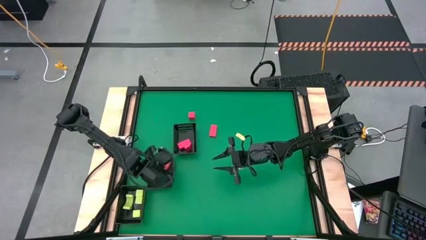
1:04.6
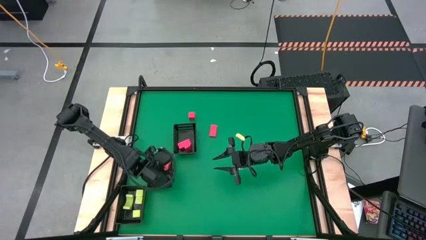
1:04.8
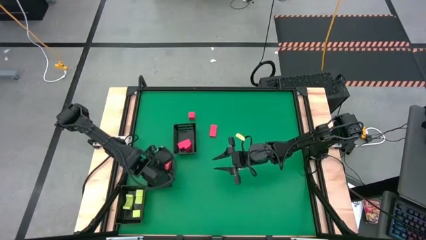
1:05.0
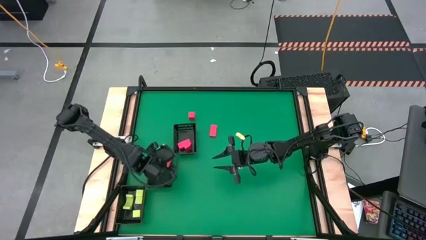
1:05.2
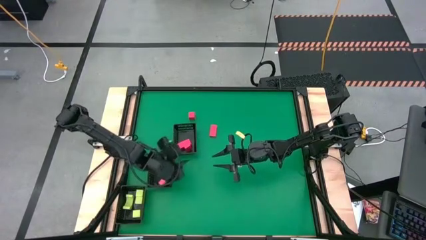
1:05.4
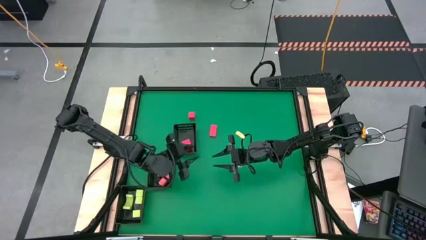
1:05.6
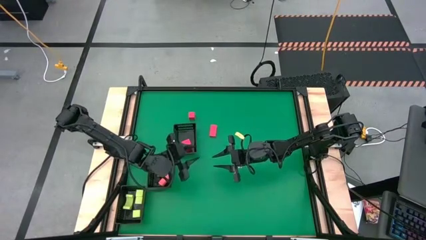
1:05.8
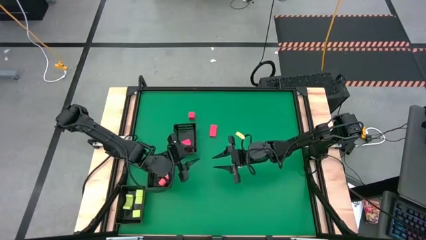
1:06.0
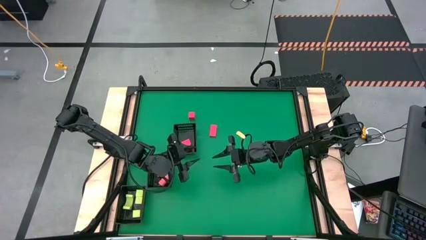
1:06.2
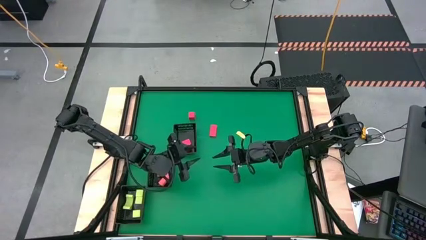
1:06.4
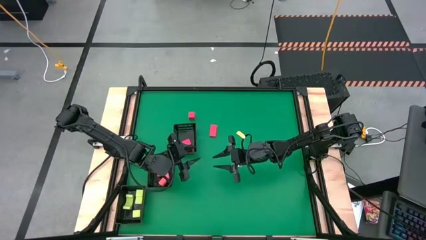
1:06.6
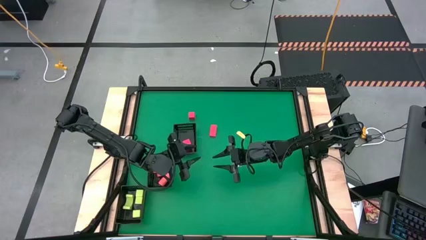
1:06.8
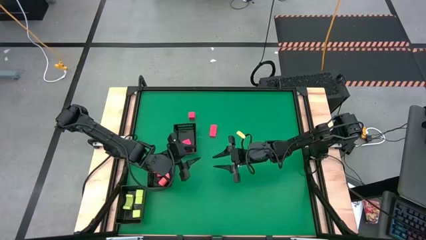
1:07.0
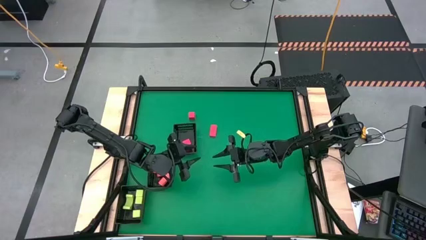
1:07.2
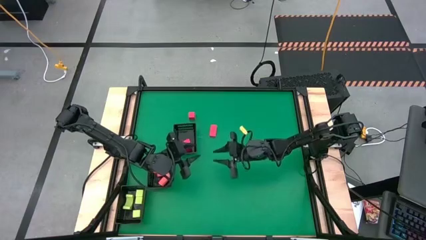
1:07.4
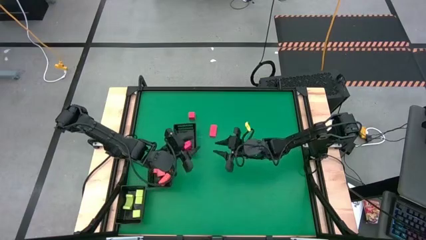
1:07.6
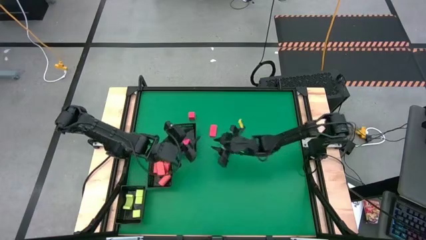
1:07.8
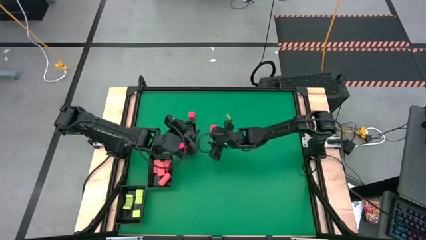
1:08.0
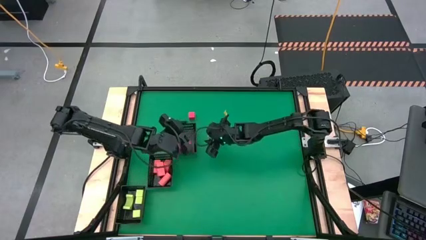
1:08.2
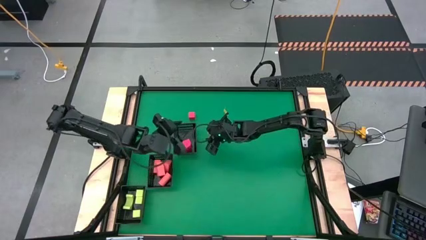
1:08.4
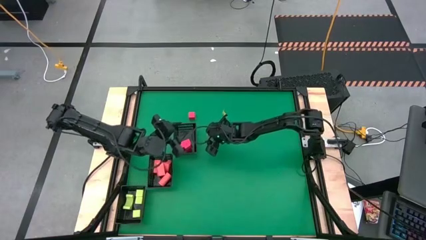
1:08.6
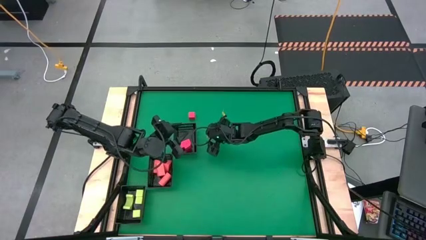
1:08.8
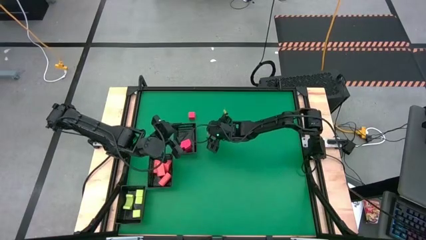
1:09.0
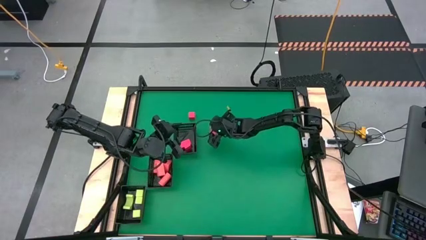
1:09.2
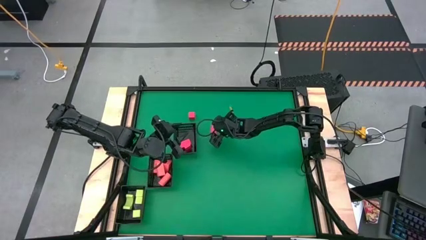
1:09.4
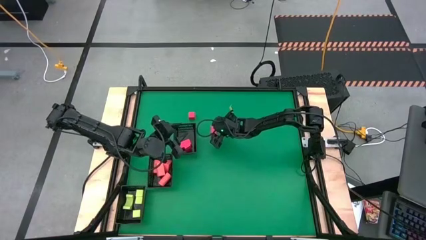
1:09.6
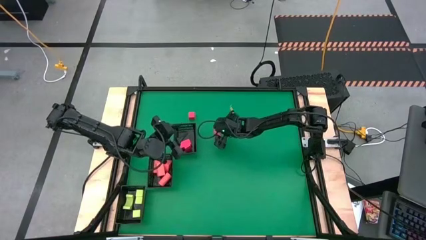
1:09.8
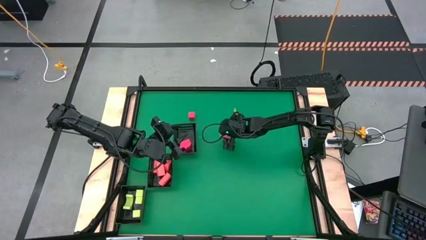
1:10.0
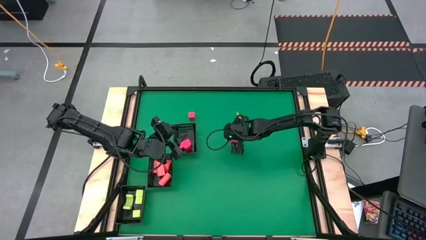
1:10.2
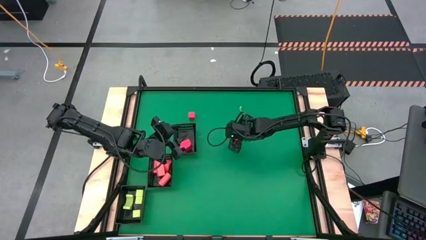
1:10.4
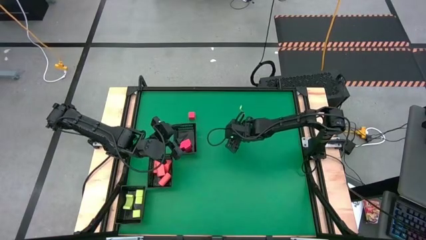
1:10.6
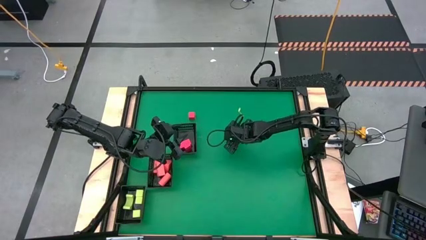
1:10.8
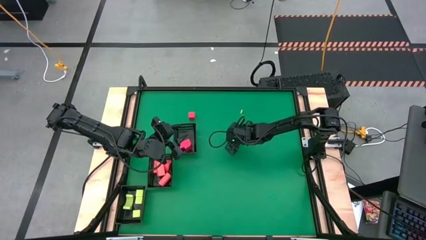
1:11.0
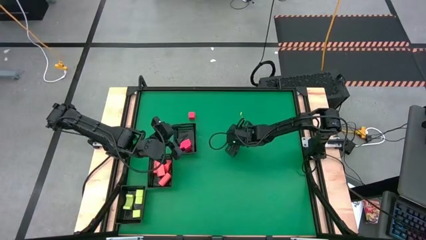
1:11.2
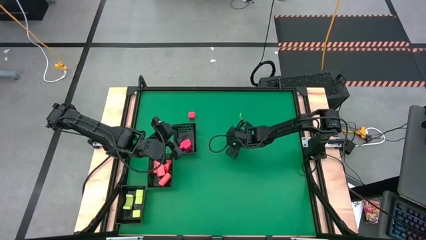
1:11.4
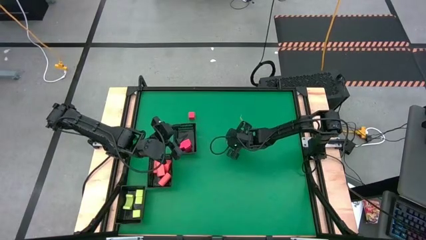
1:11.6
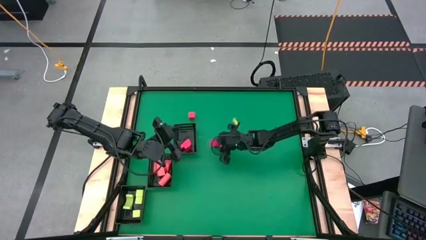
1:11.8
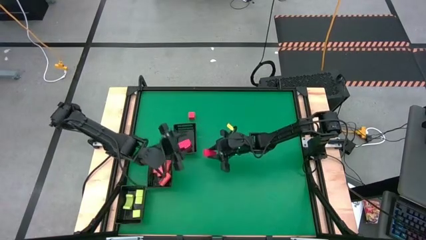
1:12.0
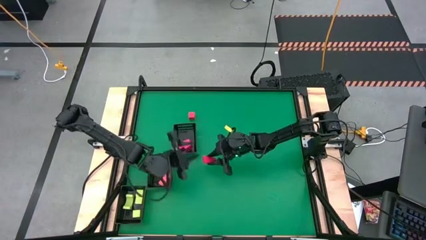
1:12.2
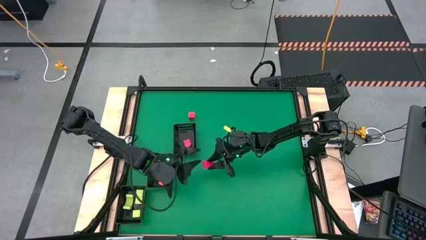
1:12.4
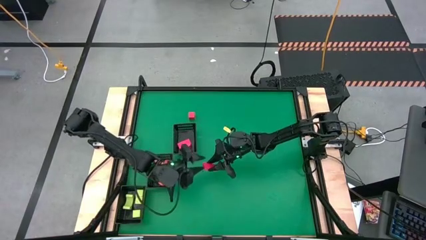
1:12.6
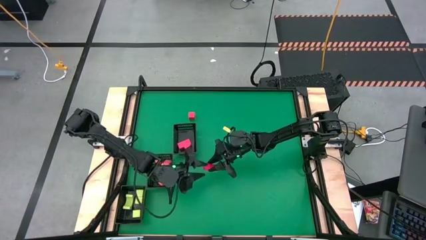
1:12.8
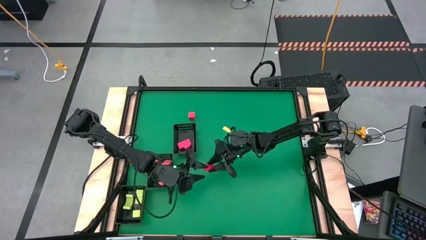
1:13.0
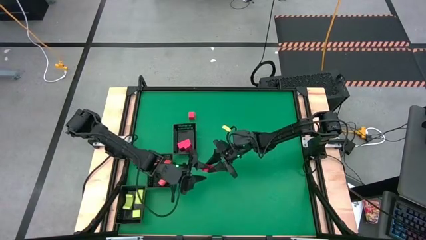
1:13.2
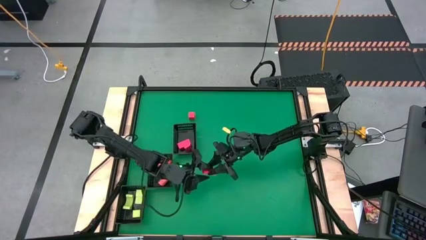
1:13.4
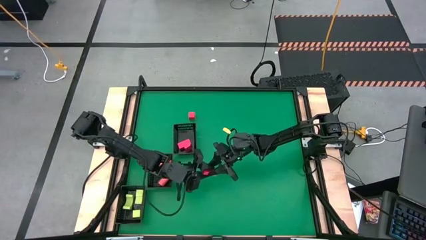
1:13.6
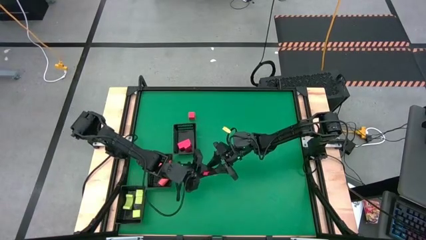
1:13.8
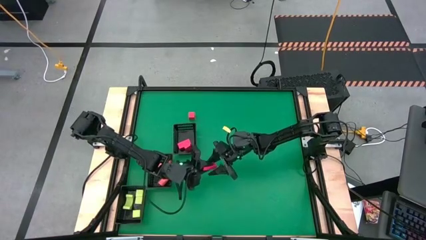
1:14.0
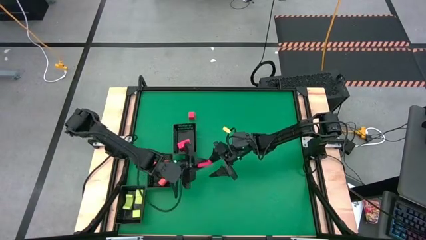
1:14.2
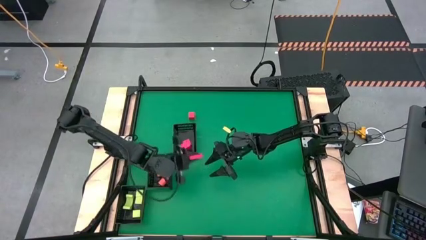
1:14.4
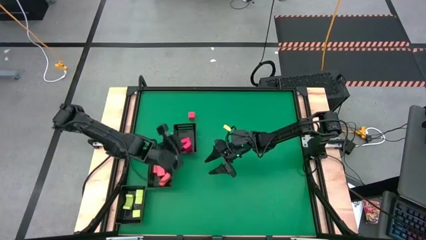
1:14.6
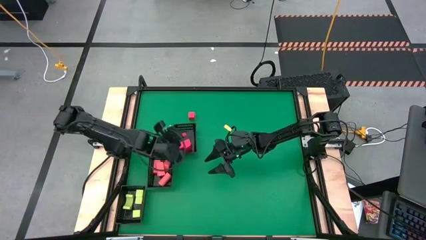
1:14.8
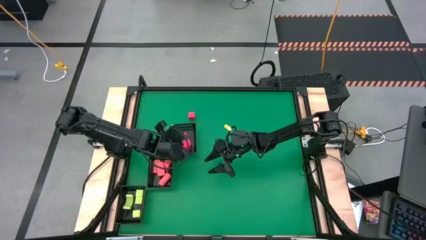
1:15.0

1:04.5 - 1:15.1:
Task: Sort & place blocks by color
Put the red block into the top black bin

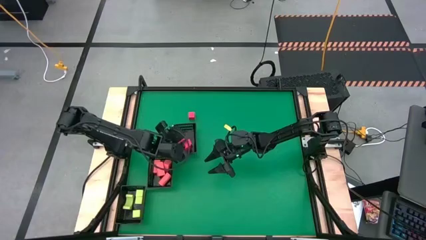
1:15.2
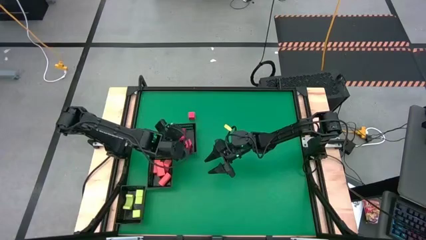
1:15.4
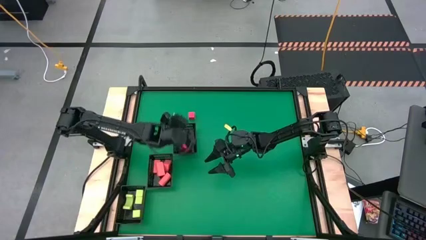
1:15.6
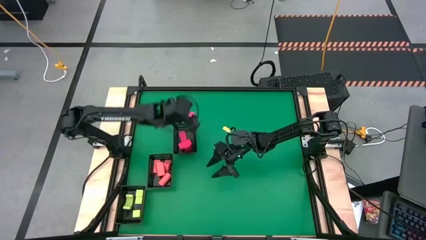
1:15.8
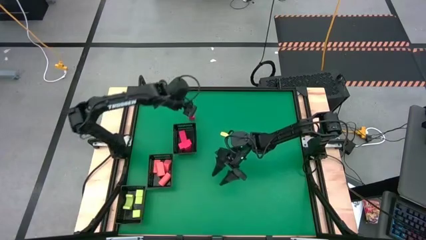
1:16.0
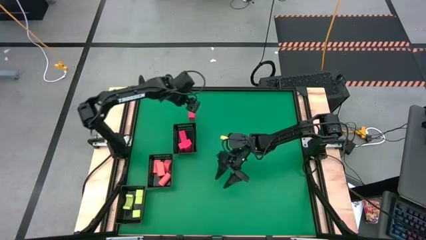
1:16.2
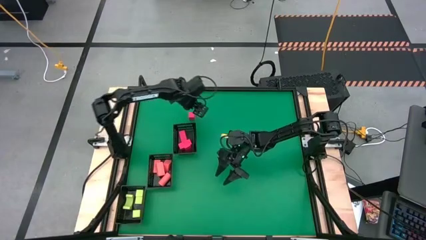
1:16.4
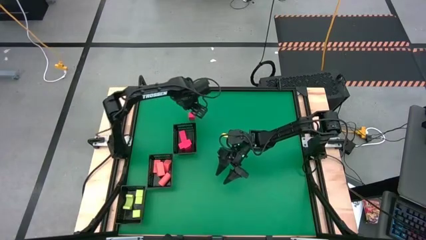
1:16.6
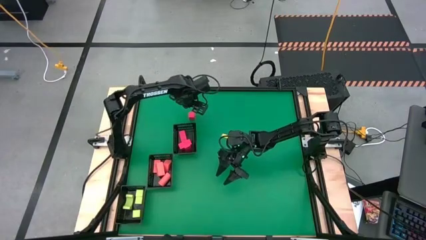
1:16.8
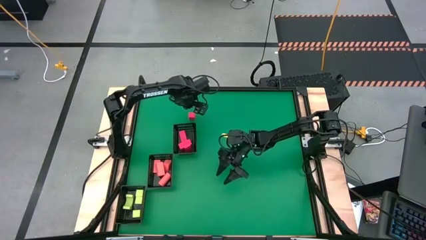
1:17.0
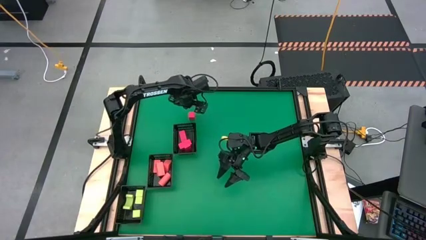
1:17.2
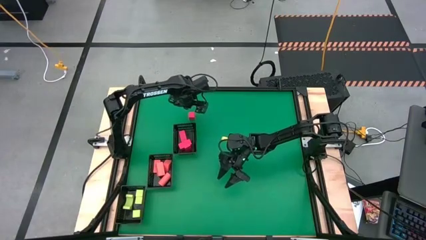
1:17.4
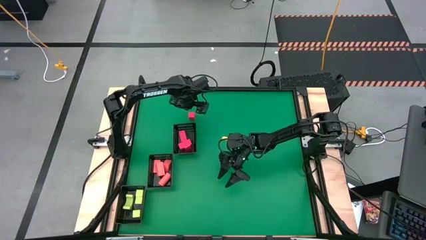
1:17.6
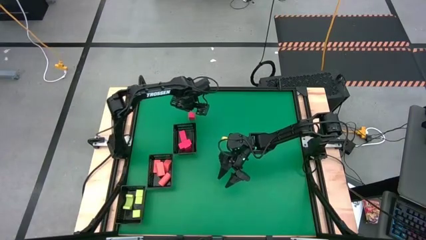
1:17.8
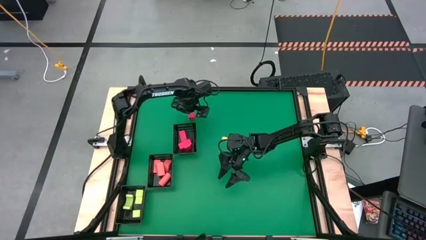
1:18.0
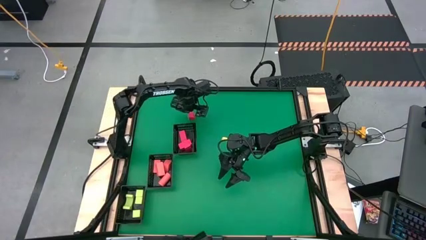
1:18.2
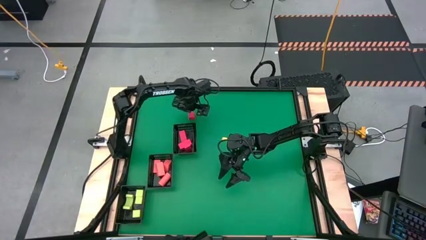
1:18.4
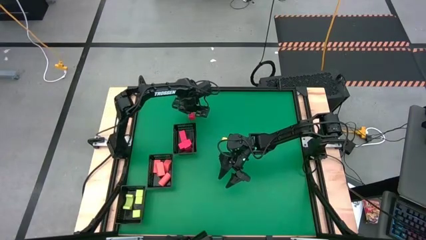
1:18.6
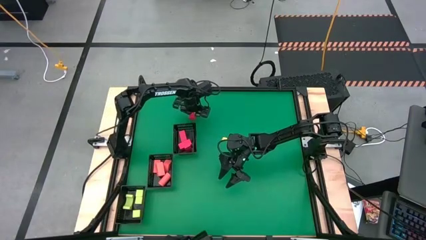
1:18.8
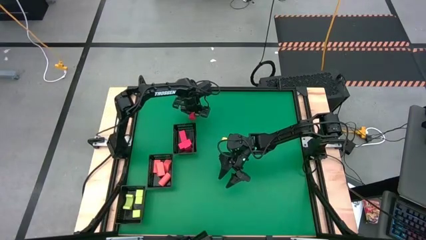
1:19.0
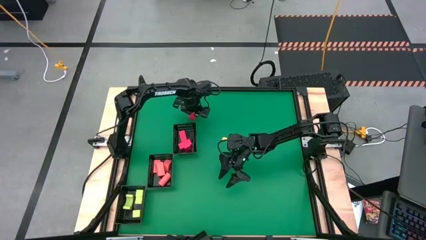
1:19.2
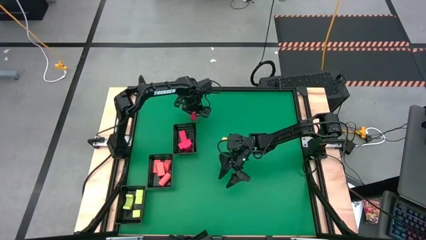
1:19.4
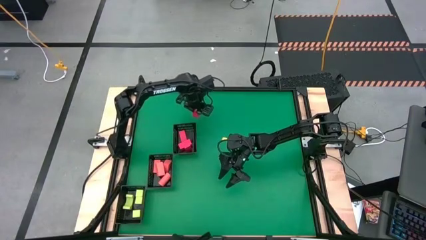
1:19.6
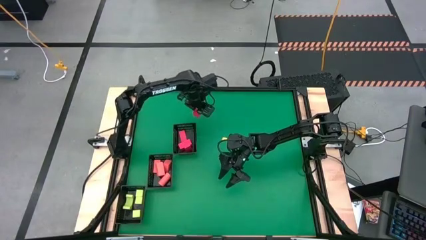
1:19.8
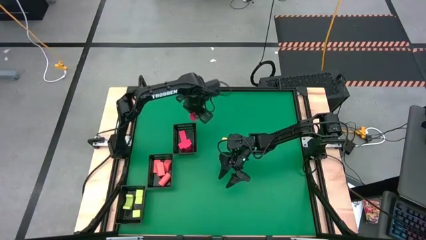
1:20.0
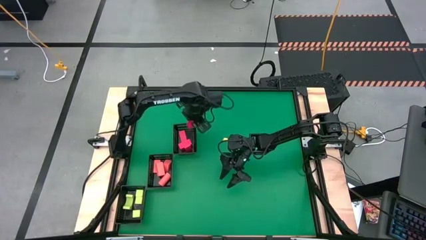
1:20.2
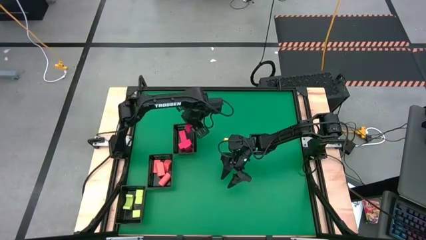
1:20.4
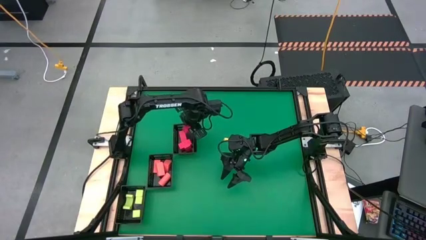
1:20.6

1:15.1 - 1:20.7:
Put the red block into the top black bin
